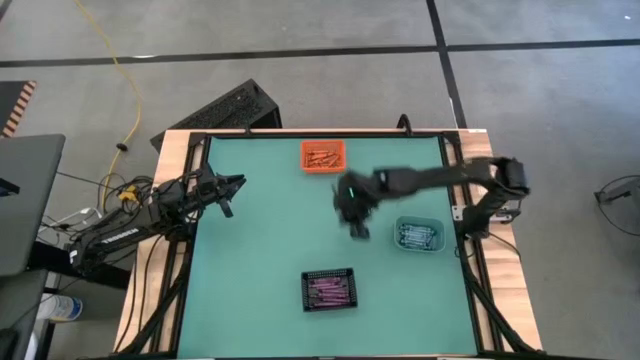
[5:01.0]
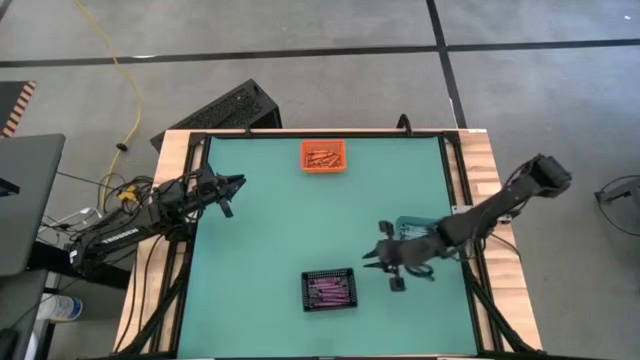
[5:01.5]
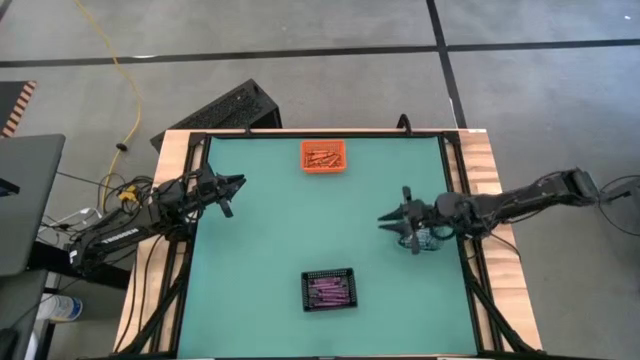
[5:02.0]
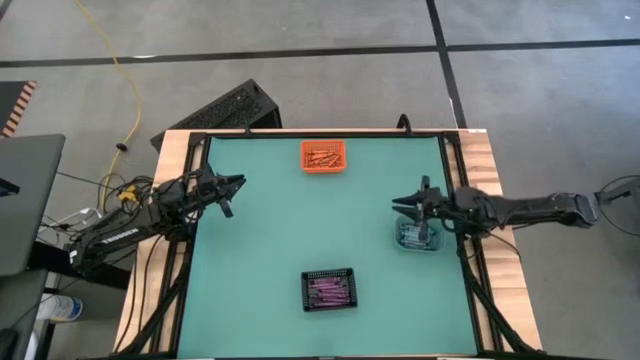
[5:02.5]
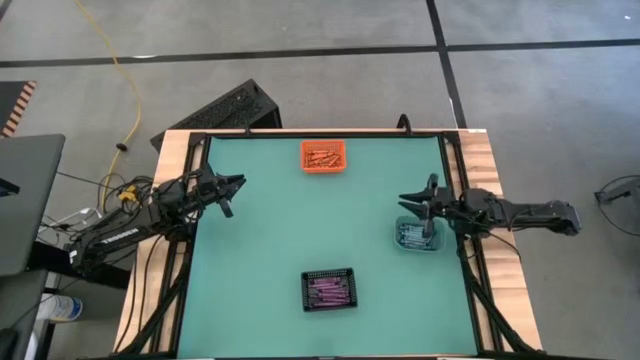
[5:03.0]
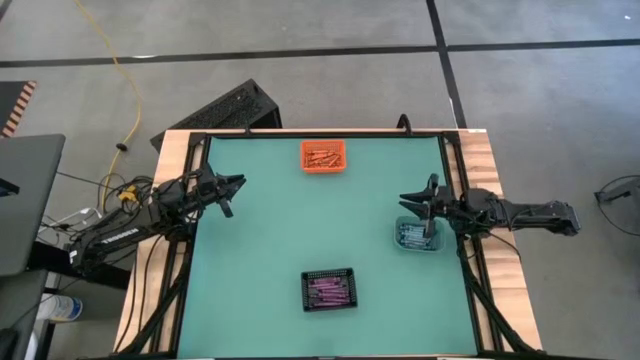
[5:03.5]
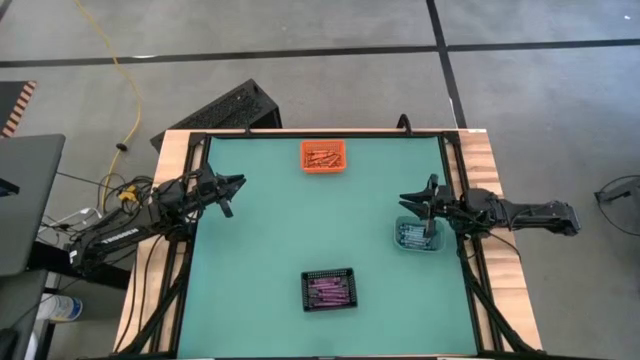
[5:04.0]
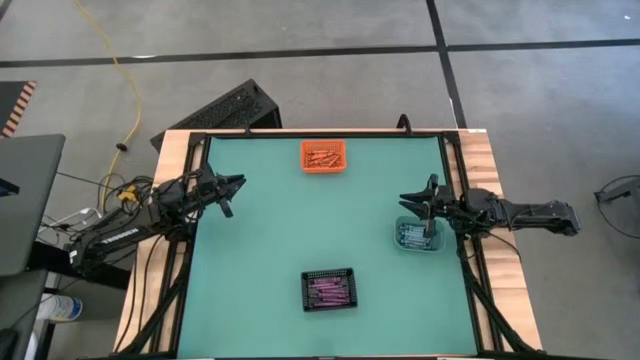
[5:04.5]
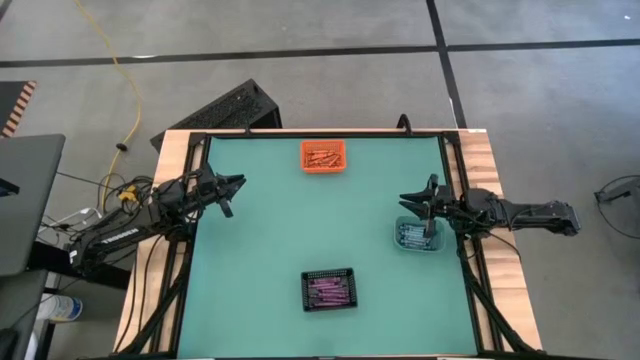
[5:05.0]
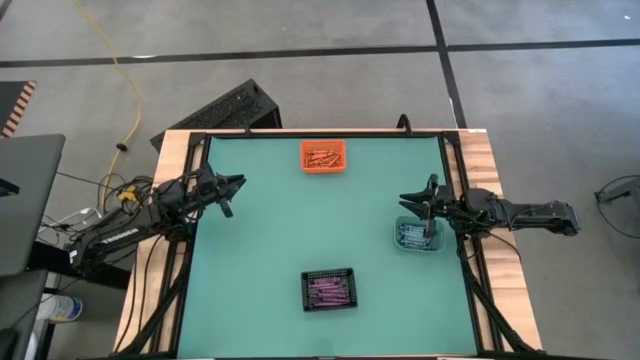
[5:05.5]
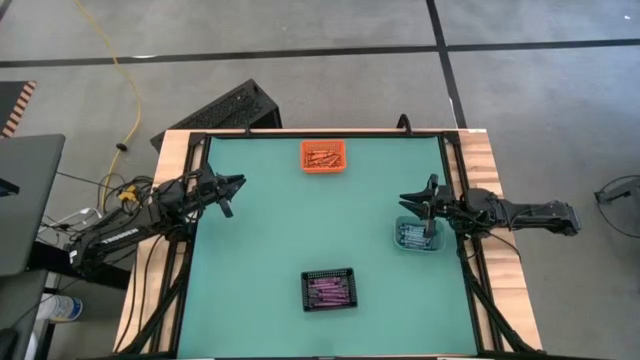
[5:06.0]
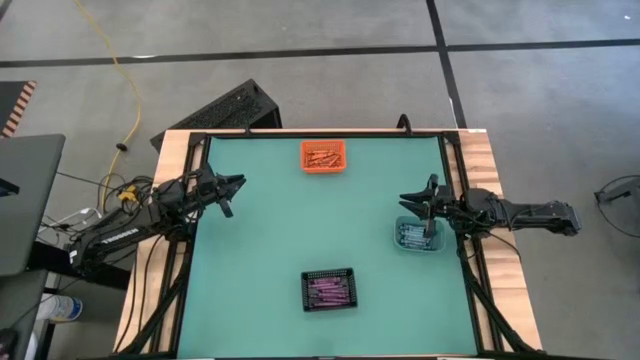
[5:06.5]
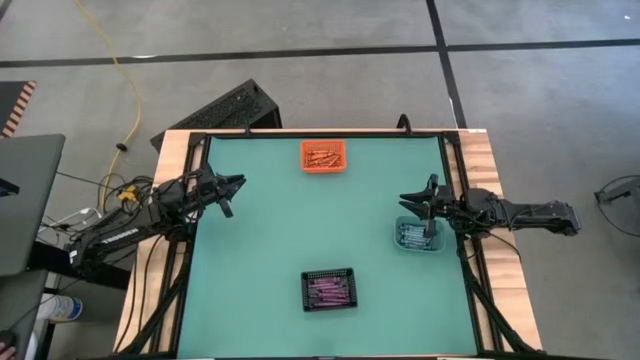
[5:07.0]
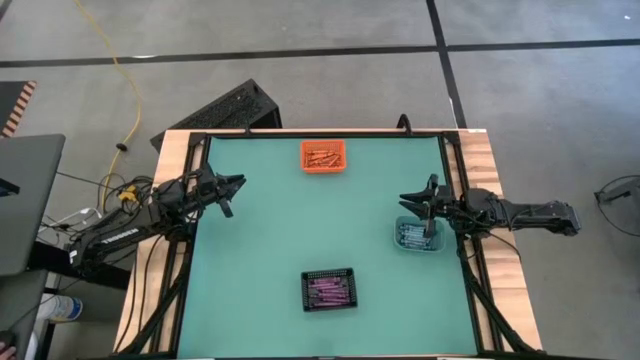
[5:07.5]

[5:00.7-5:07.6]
Task: Sort crayons
Return to Home Position

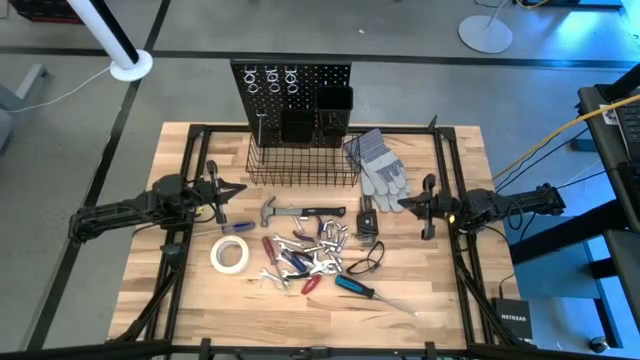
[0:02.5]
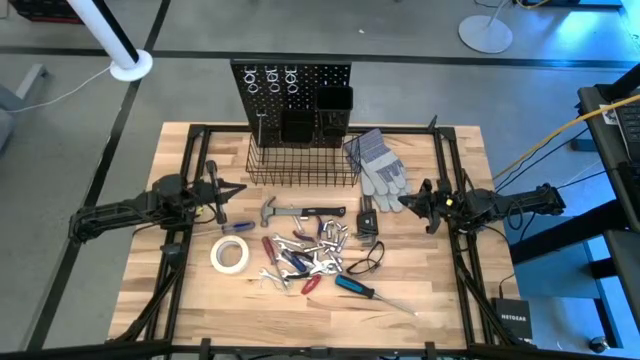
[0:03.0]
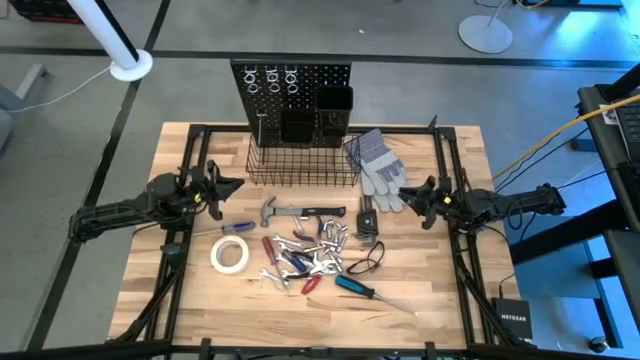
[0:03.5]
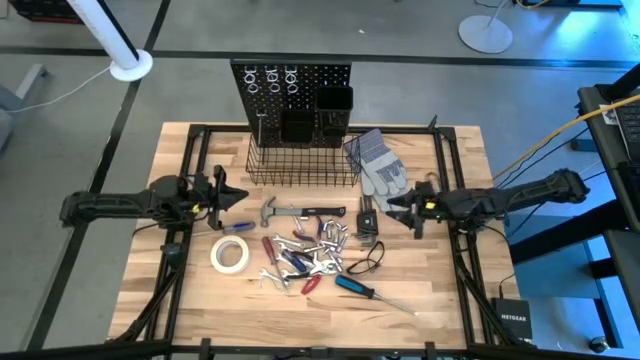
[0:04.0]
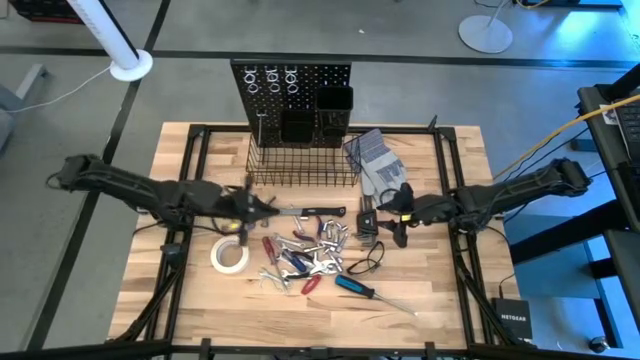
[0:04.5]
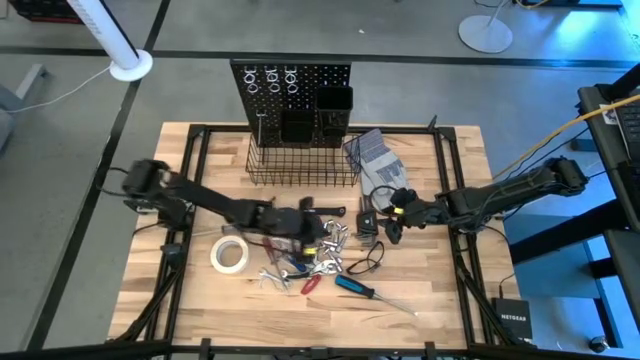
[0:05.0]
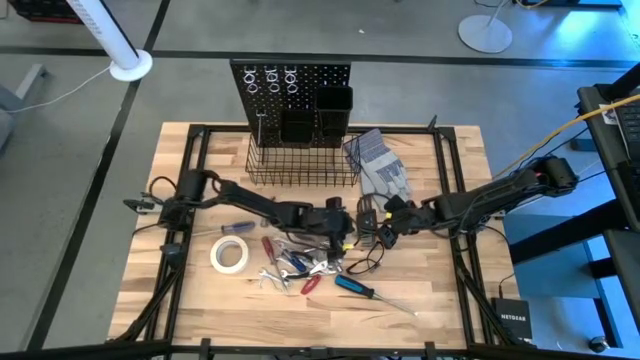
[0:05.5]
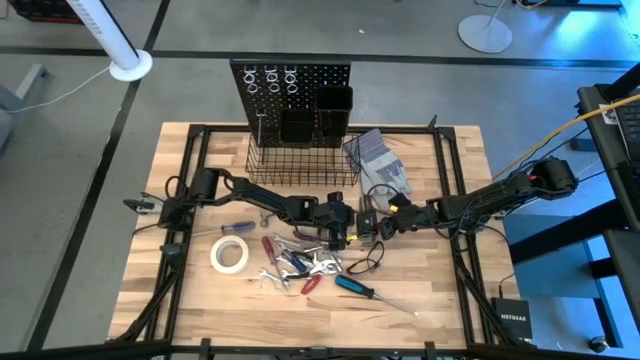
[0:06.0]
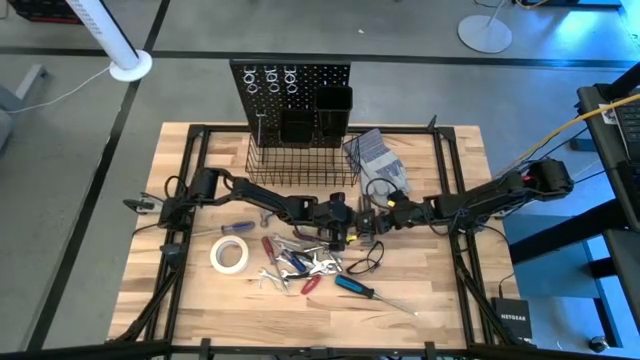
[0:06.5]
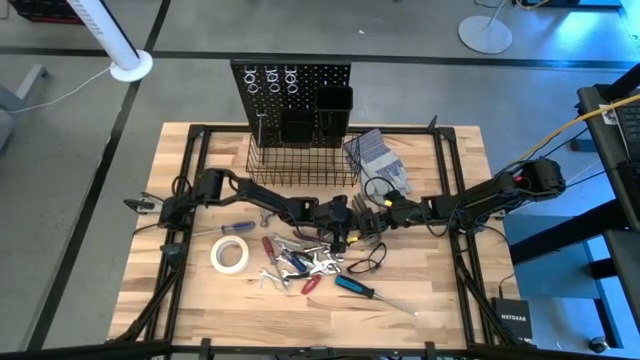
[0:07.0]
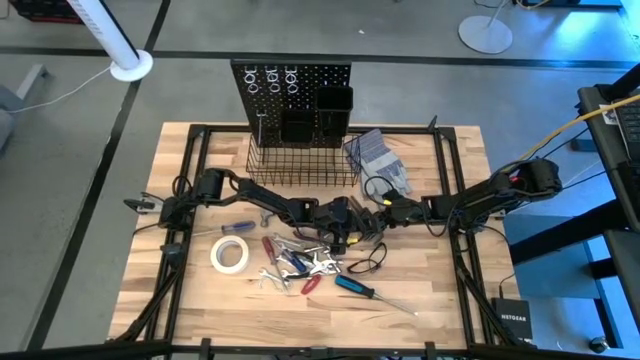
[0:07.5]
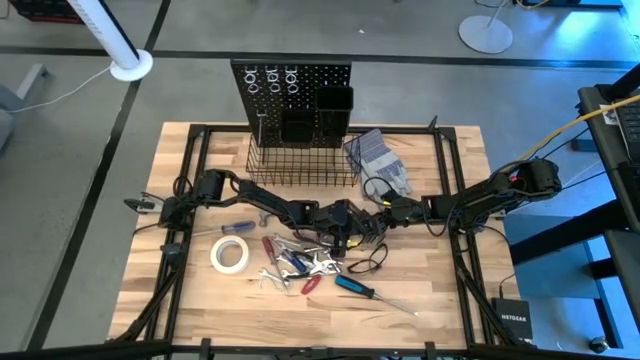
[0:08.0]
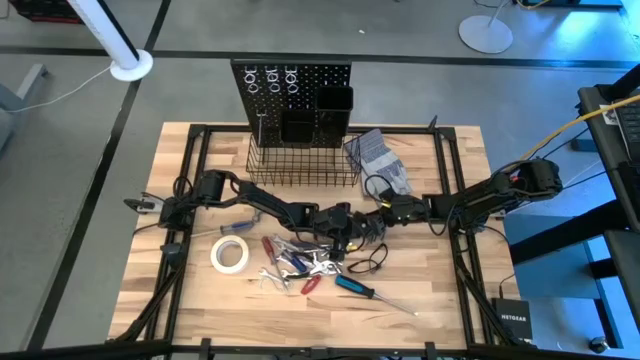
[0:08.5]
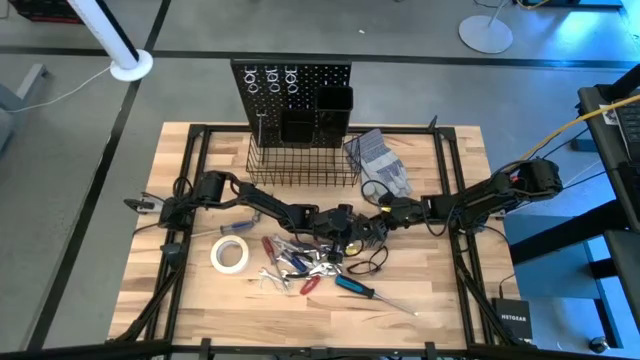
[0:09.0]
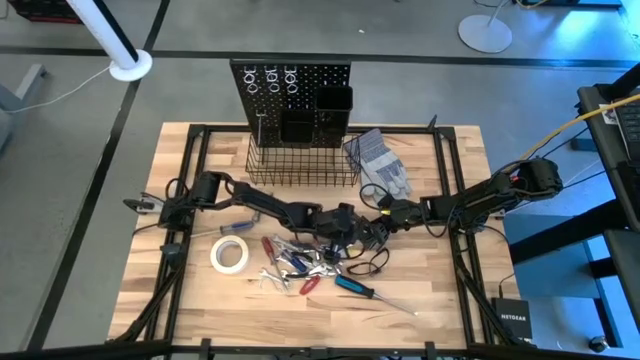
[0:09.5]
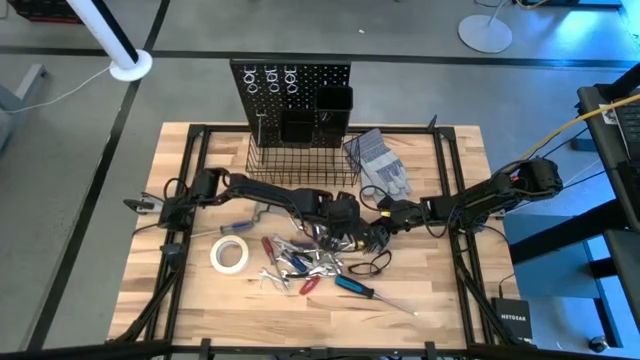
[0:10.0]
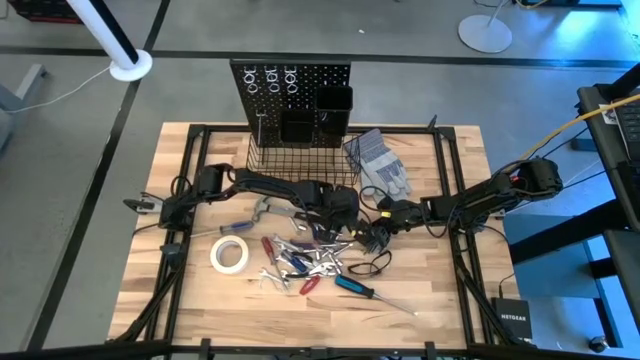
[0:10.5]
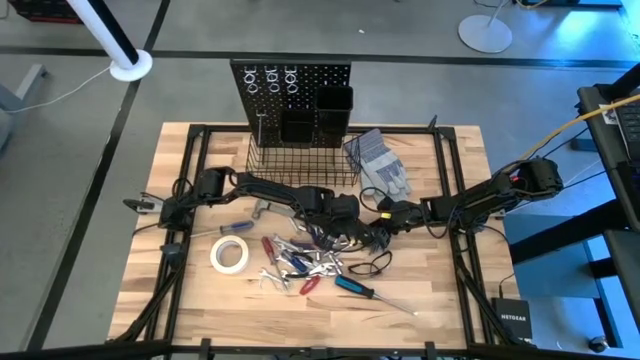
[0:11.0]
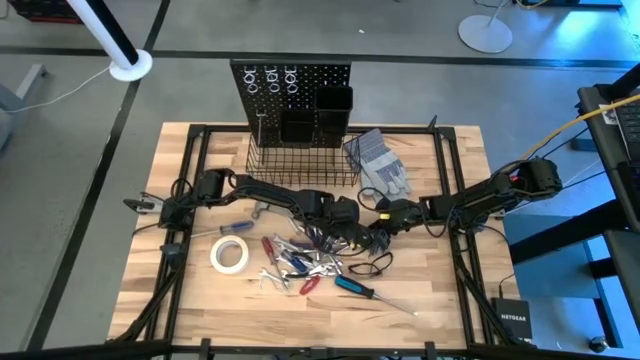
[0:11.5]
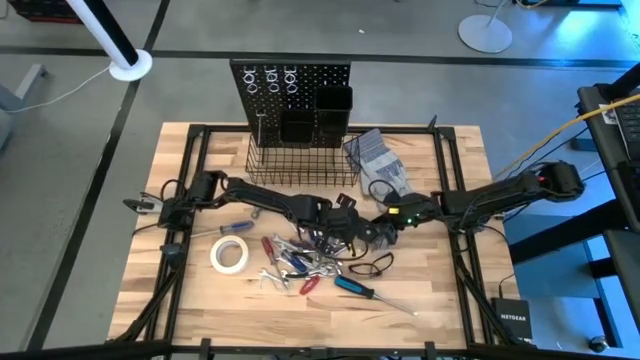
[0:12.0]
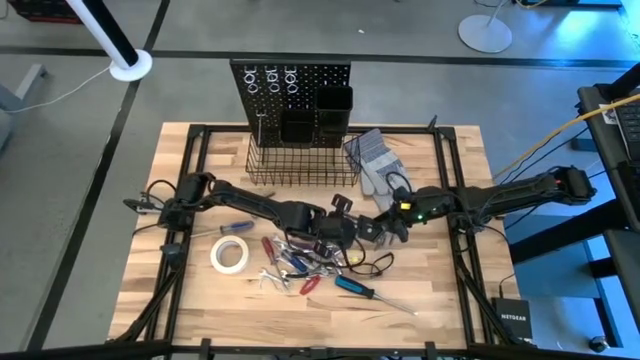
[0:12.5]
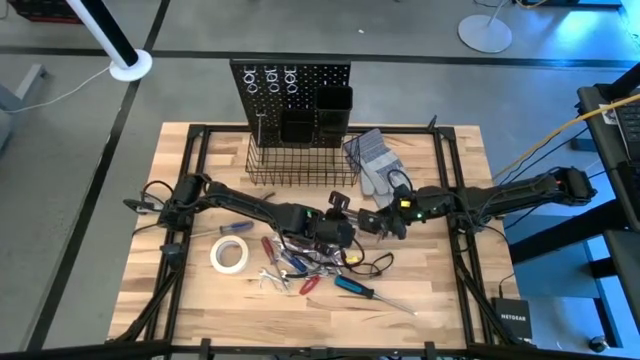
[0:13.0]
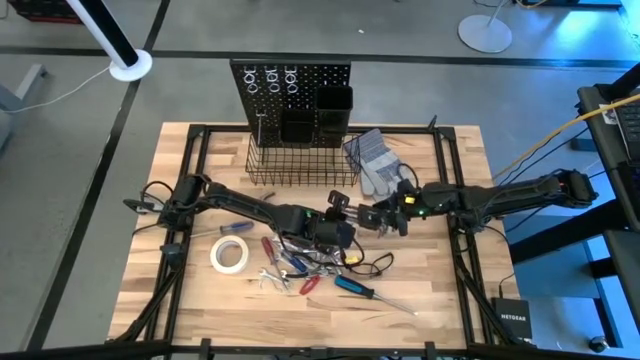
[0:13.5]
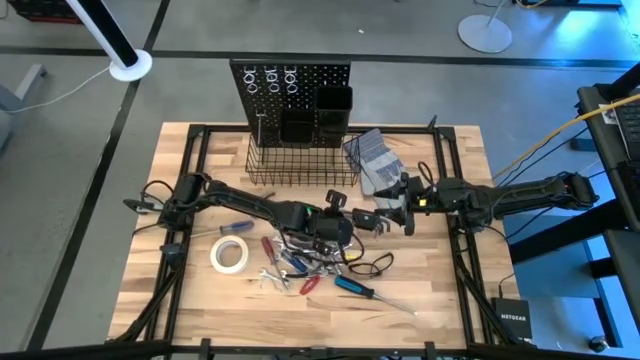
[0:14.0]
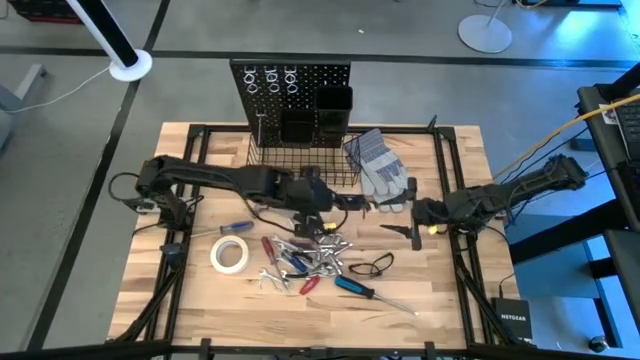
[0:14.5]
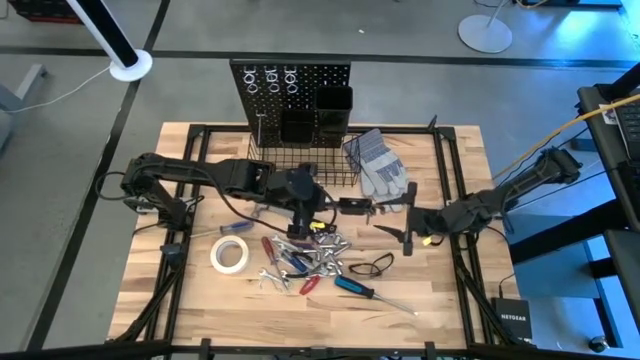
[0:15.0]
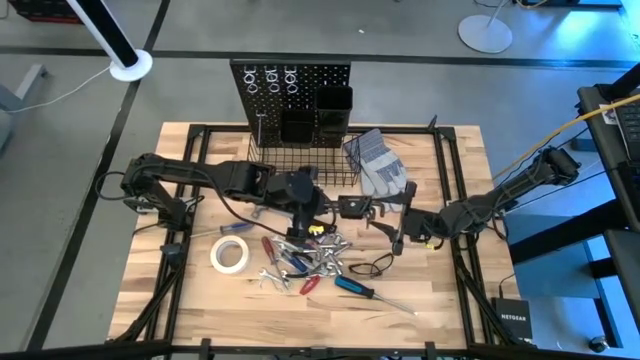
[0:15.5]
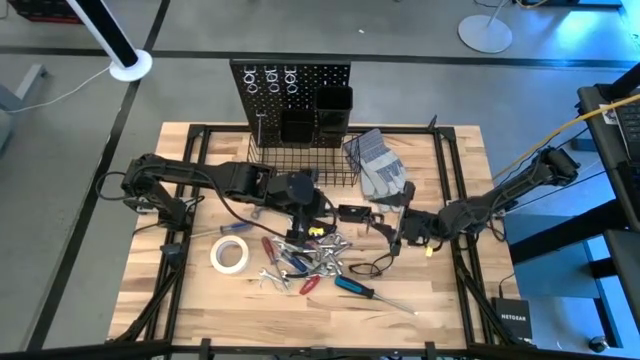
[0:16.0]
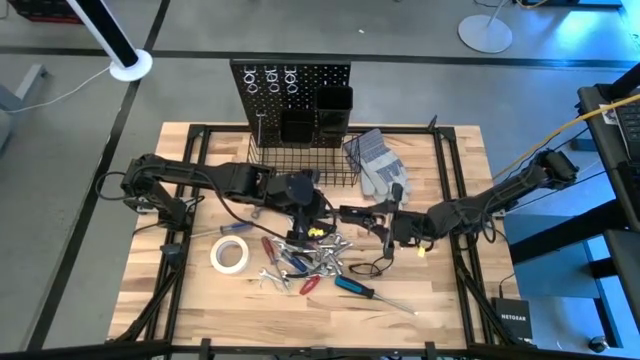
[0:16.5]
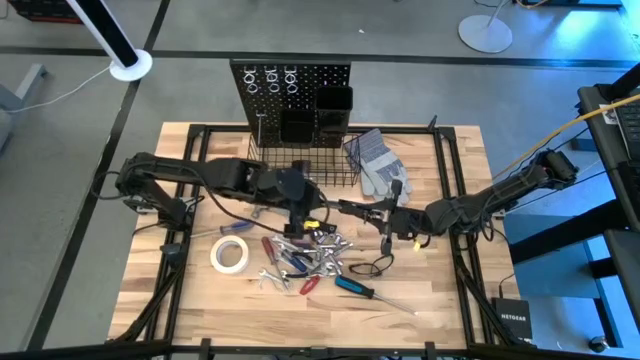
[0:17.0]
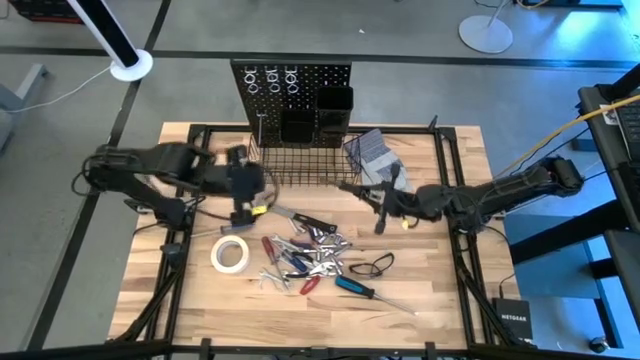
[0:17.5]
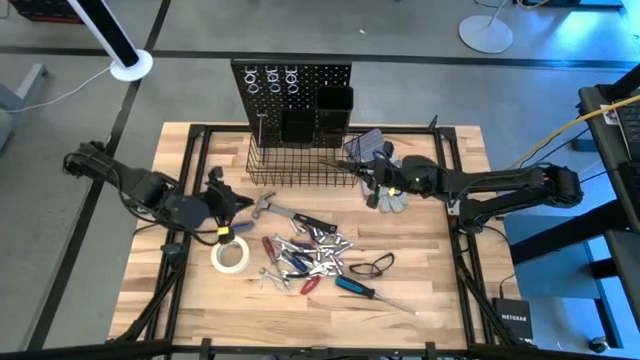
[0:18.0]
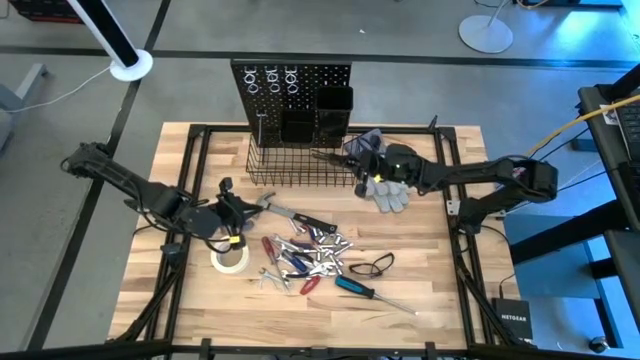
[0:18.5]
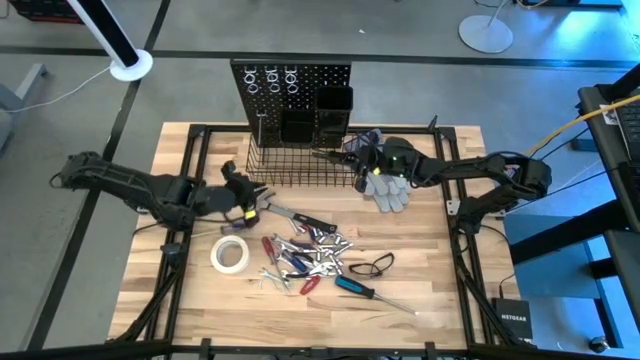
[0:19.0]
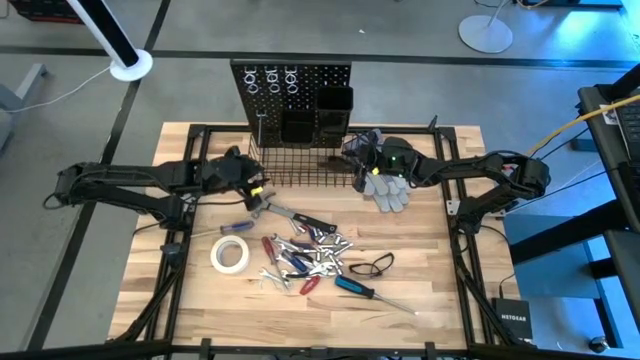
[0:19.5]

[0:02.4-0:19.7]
Task: Hang tools onto peg board
Put the allen keys into the wire basket on the peg board
